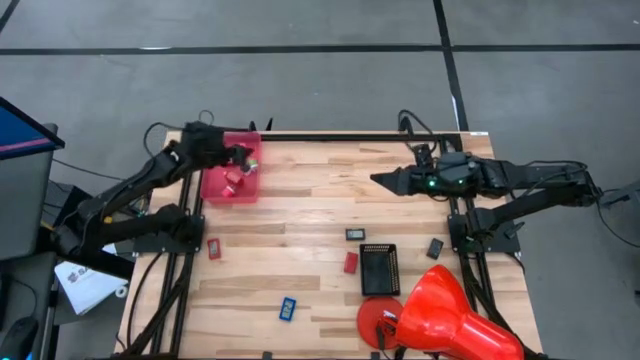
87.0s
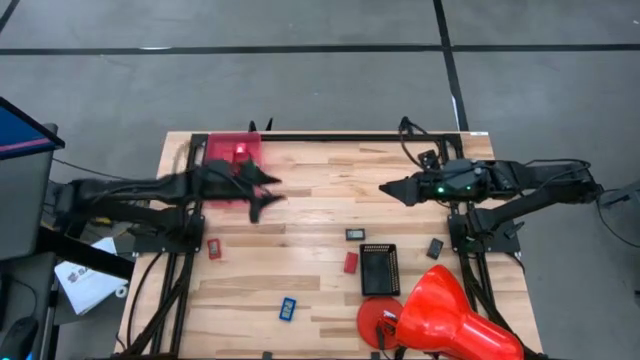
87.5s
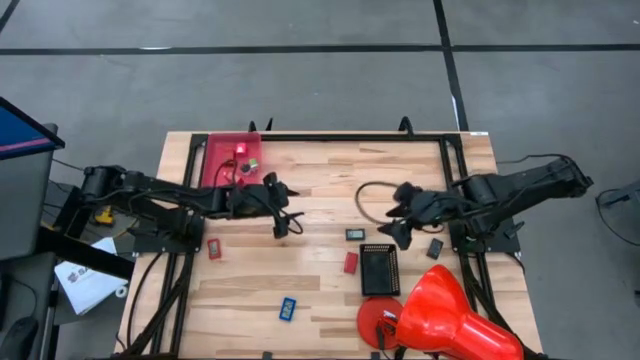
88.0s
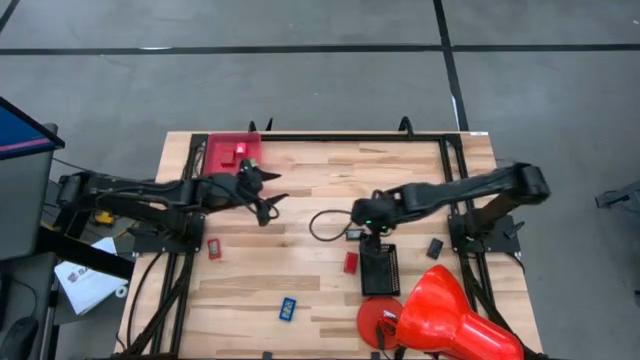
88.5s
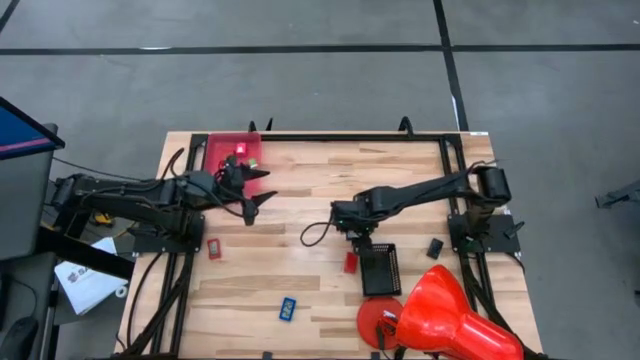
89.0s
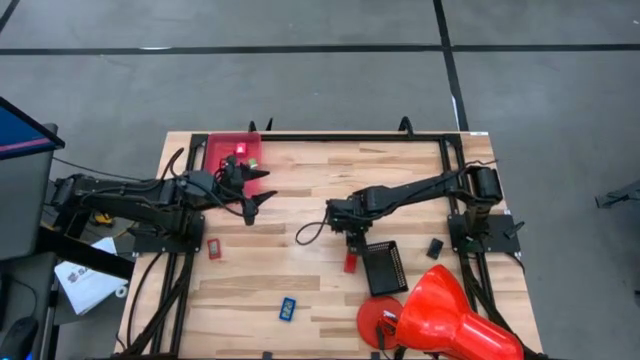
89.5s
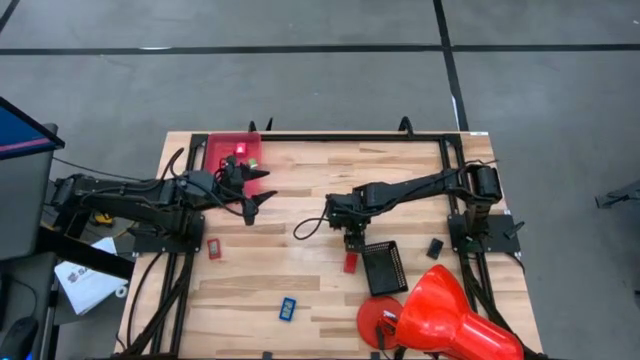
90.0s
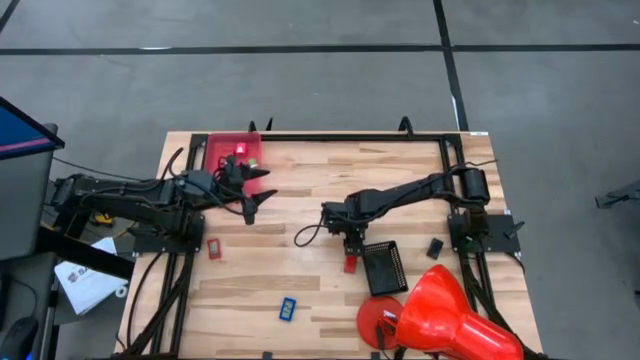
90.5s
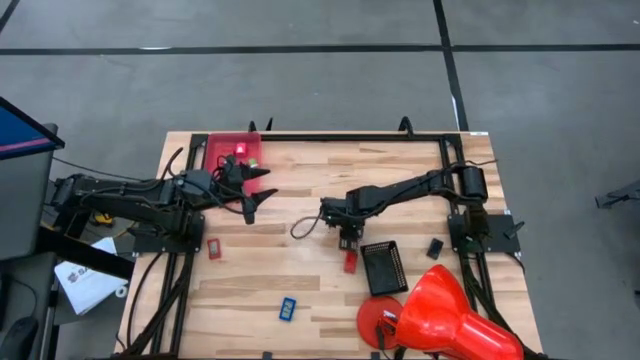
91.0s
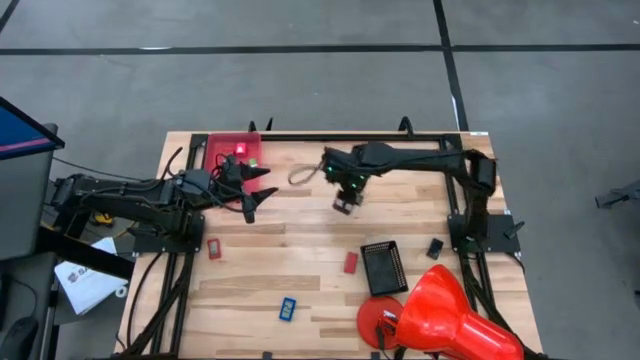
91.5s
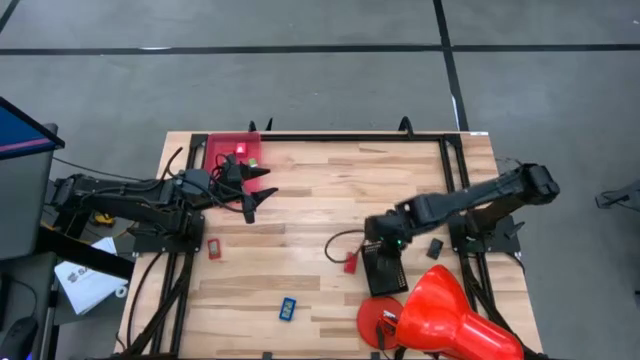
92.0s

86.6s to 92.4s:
Task: Pick & Place Office items
Put the left black digital timer into the black bin

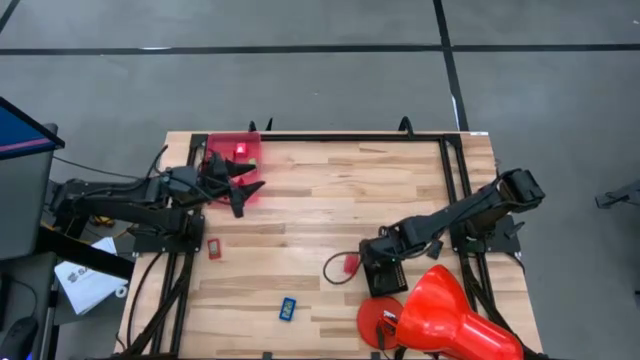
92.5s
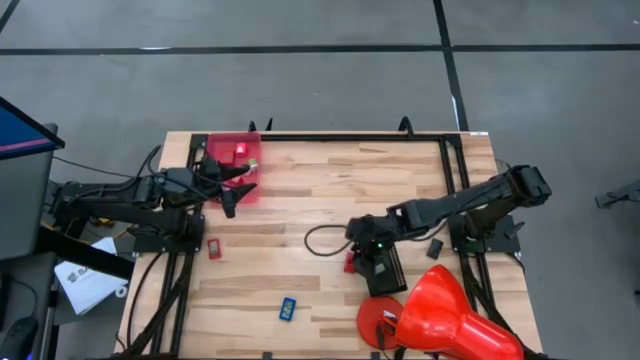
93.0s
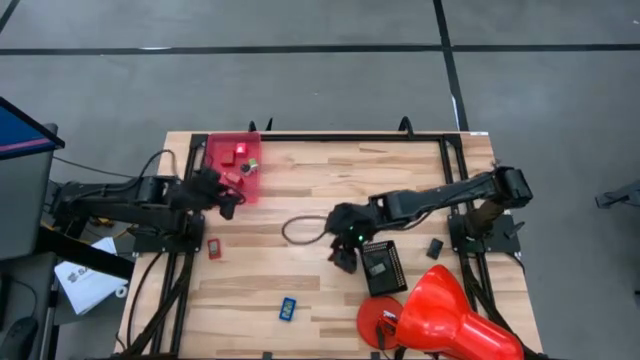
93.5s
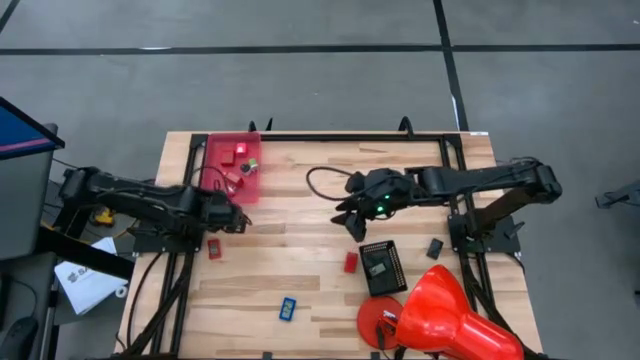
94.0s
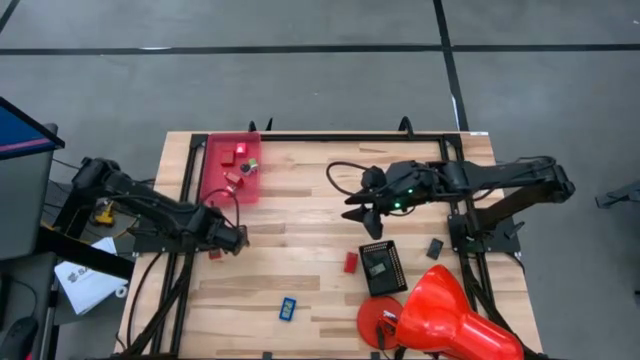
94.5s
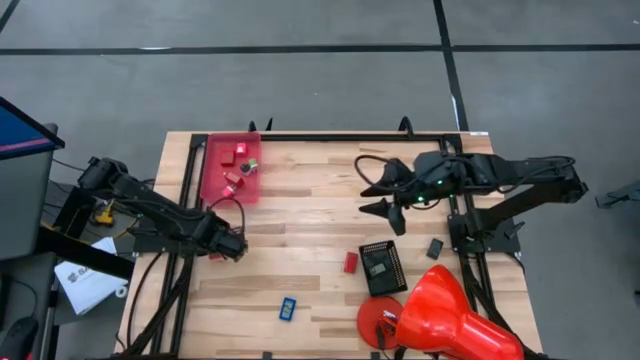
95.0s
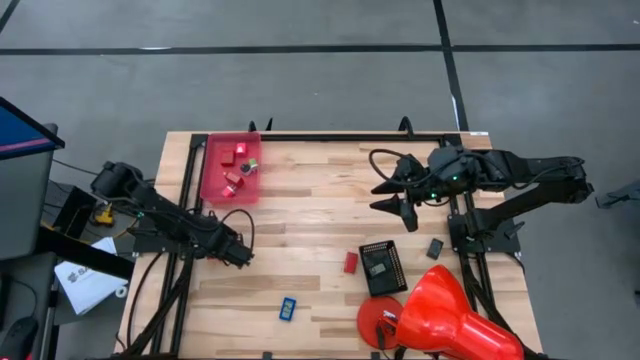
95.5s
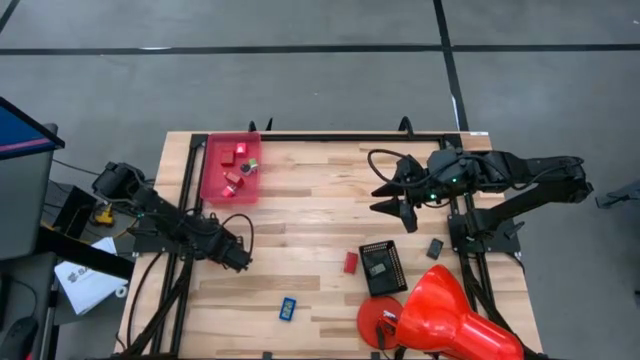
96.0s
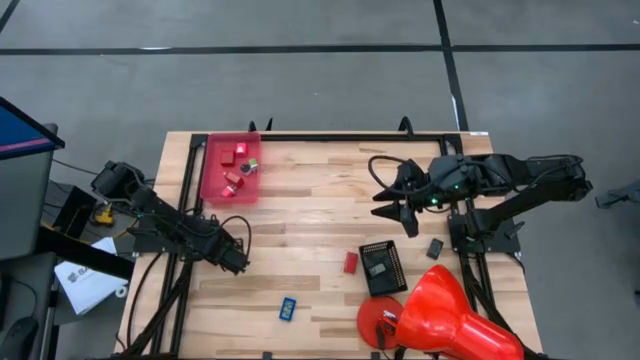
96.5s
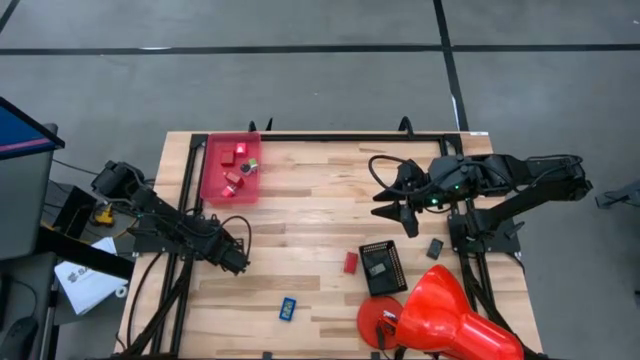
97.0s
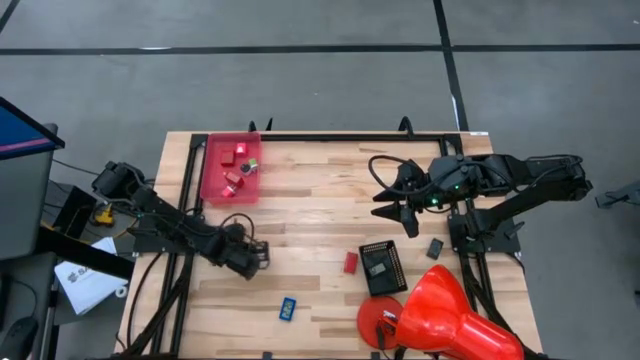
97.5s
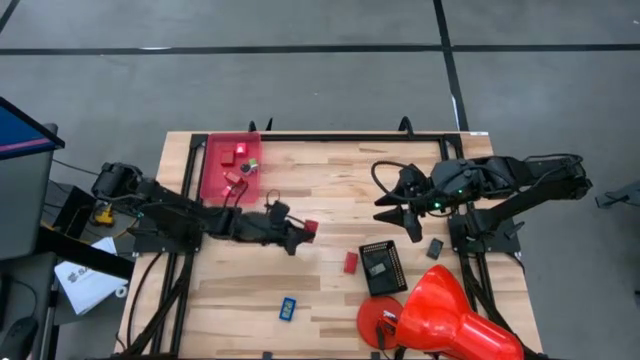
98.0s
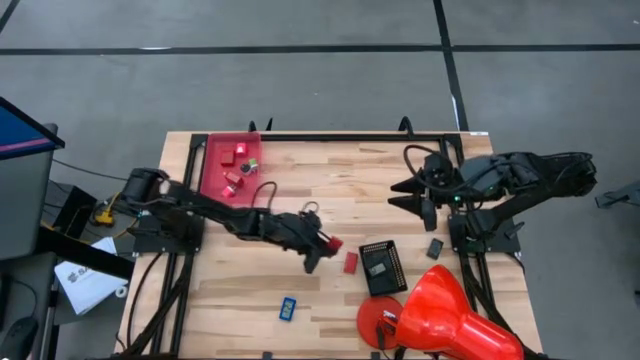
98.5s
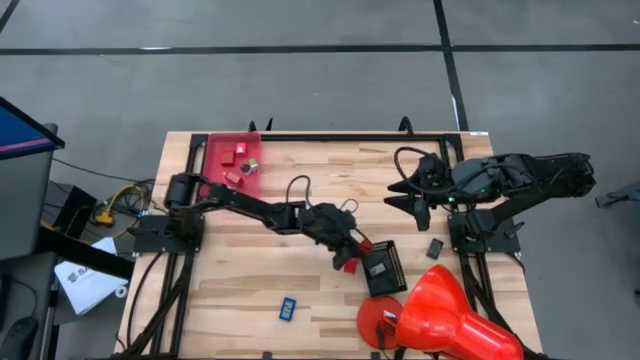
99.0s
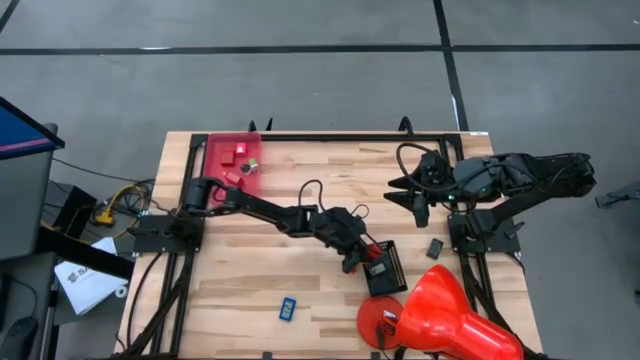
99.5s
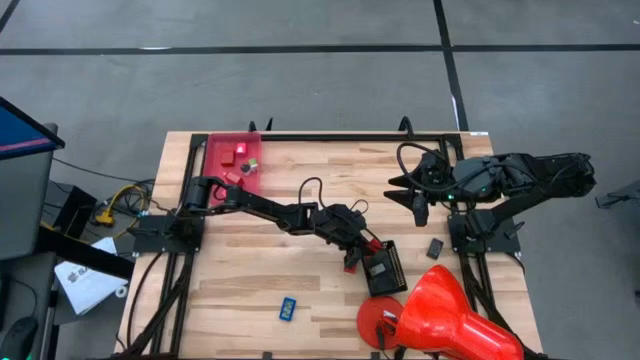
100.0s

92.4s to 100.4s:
Put the left red digital timer into the black bin

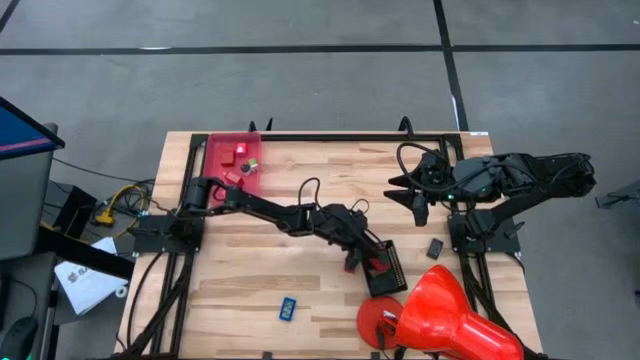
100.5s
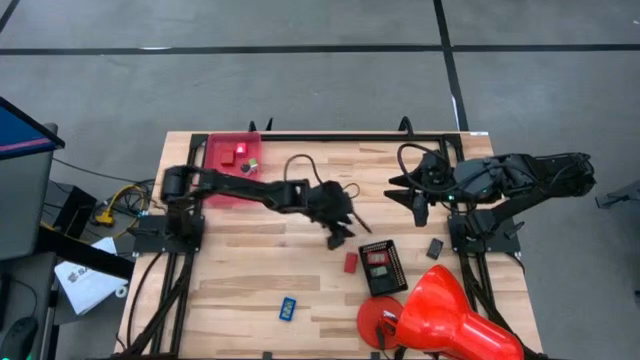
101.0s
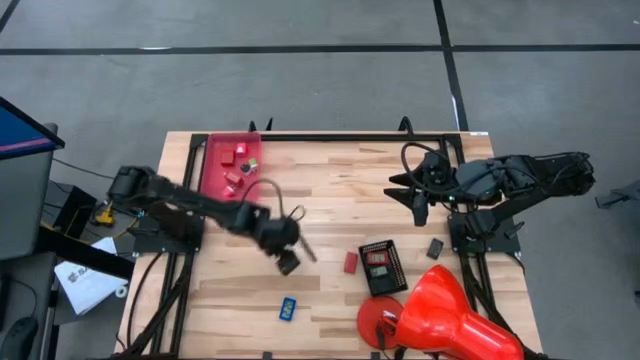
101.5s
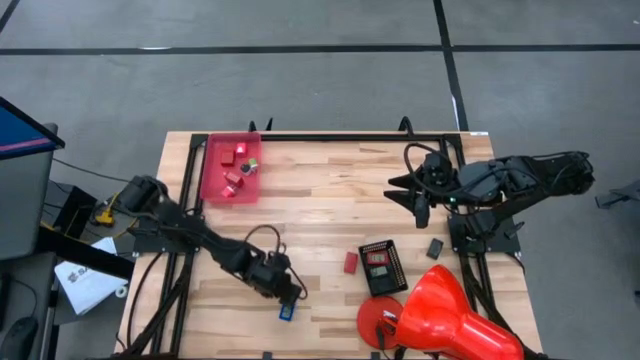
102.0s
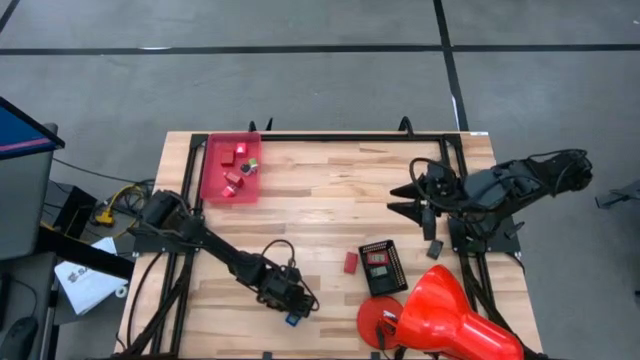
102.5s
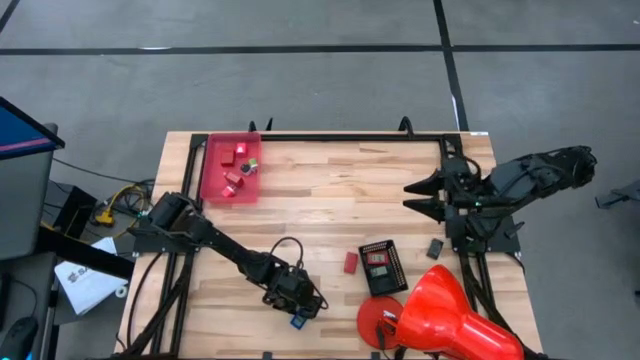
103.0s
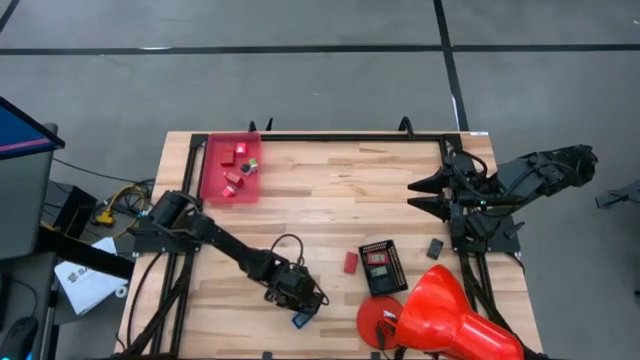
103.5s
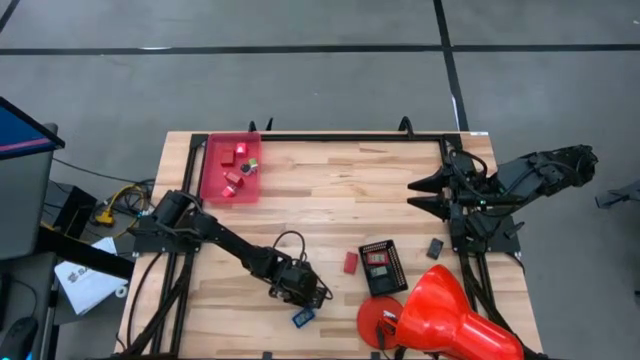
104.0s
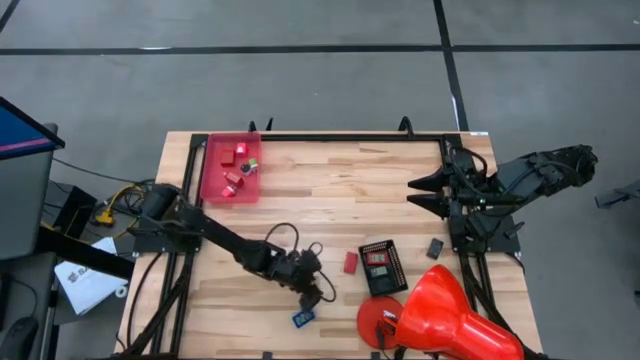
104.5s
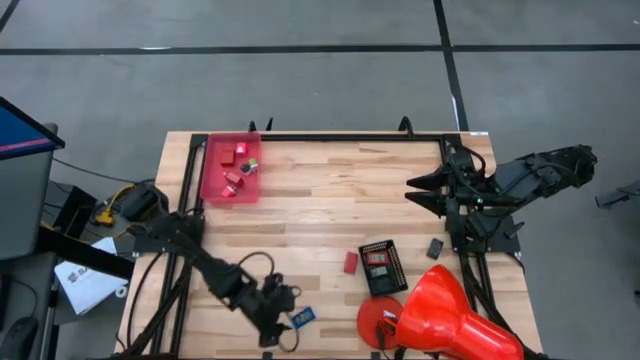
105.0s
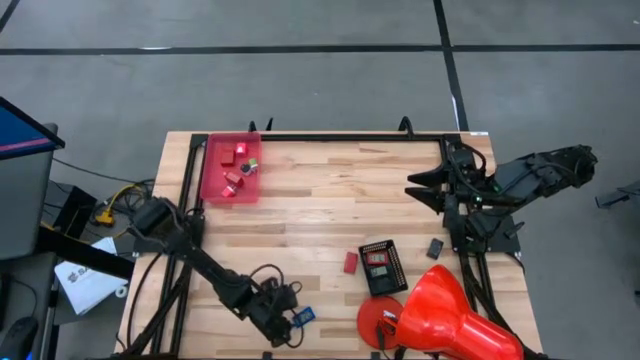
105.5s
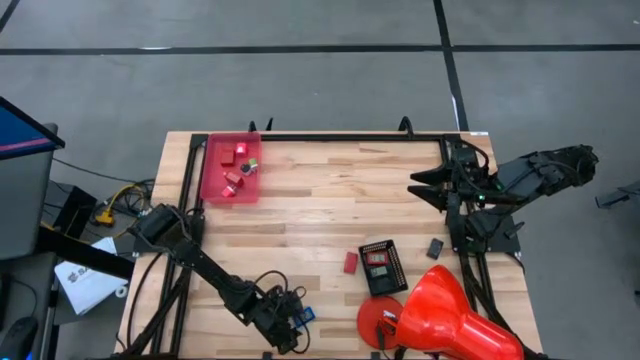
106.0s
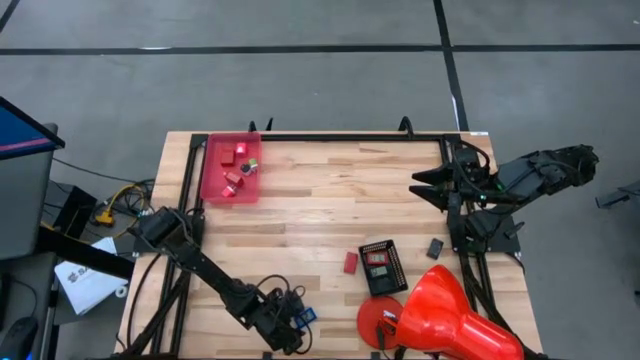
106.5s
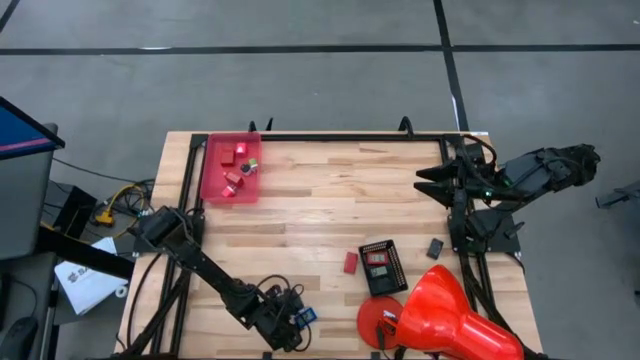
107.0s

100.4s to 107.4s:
Put the blue digital timer into the black bin

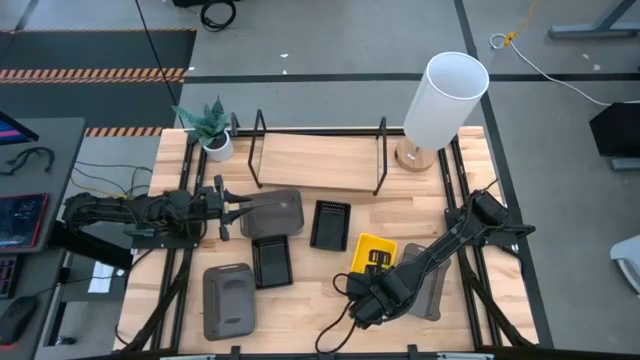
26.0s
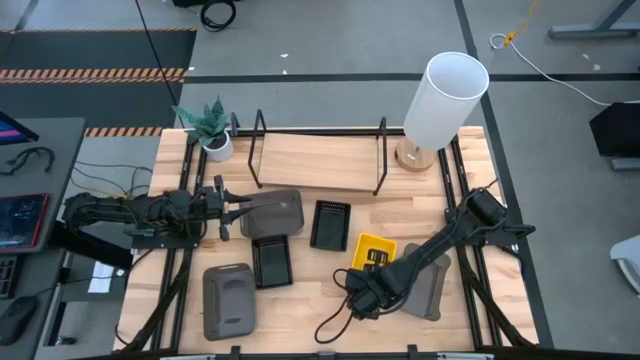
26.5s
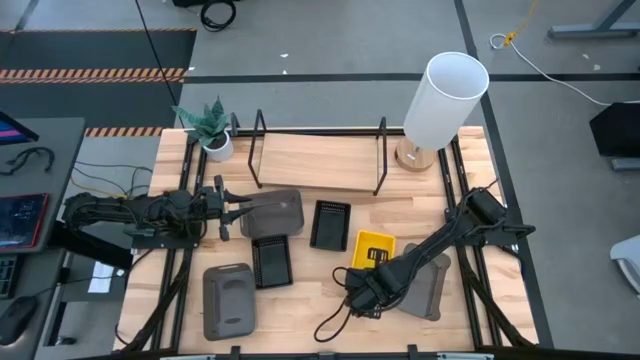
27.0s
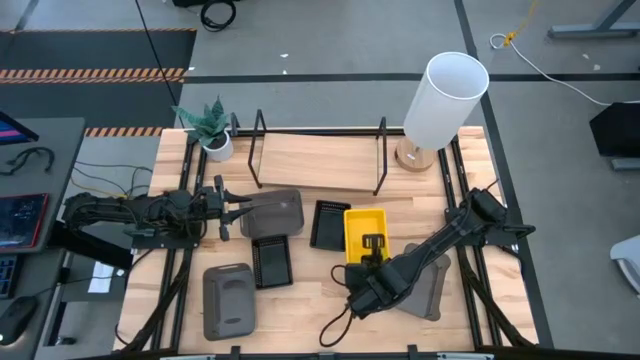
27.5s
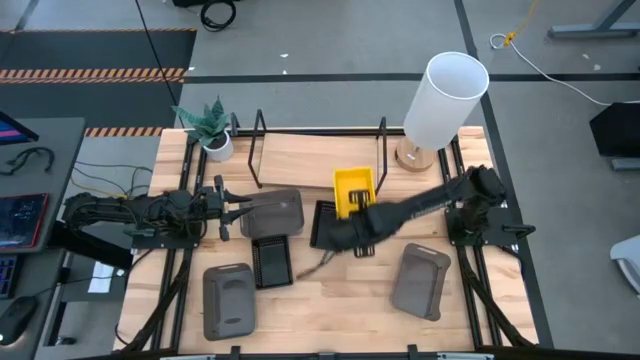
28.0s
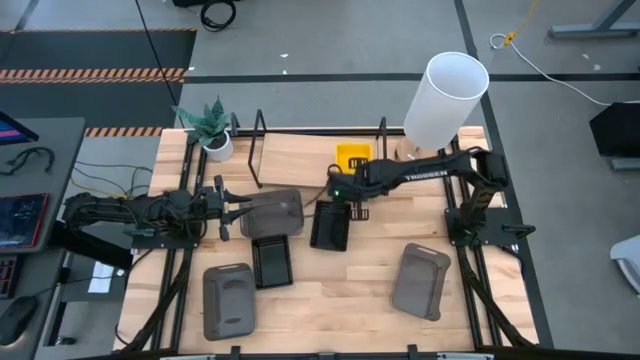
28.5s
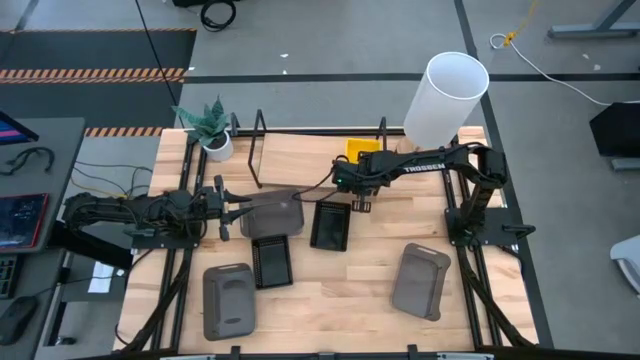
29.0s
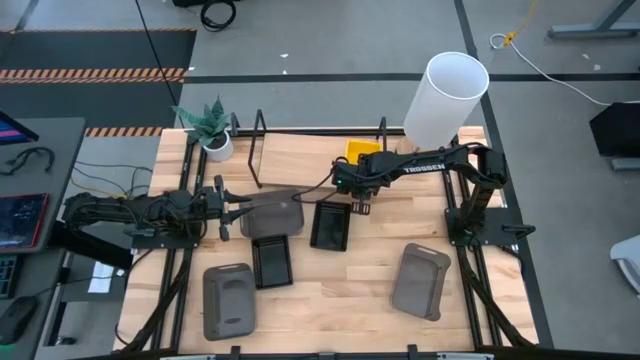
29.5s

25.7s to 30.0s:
Task: Stack baskets on shelf by color
Put the stacked yellow bin on the shelf
